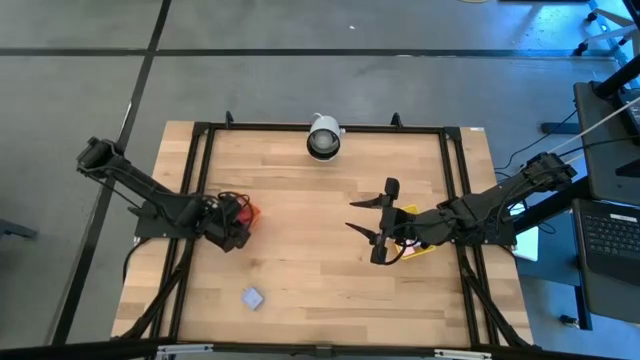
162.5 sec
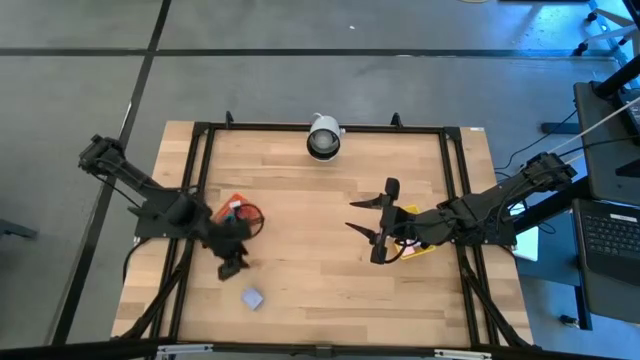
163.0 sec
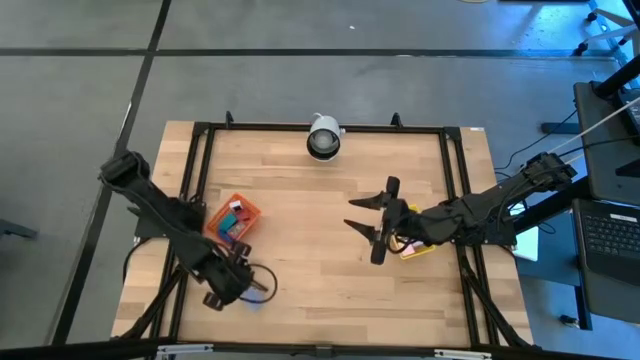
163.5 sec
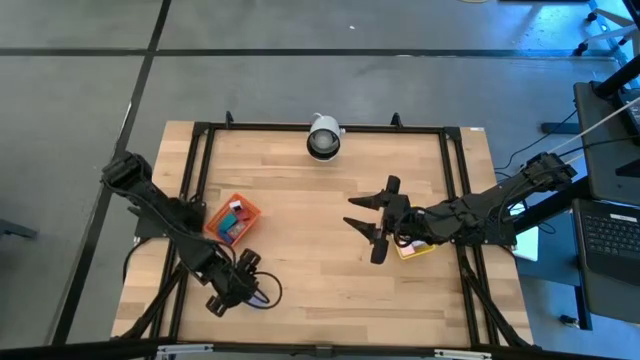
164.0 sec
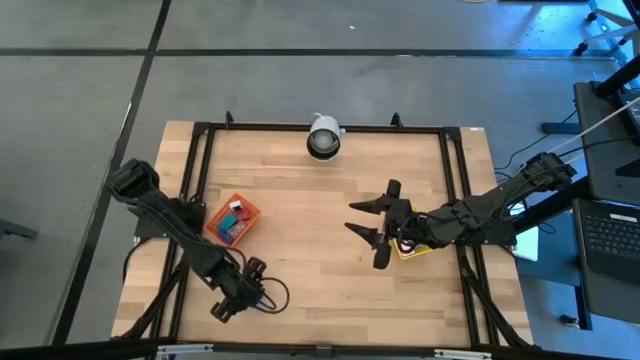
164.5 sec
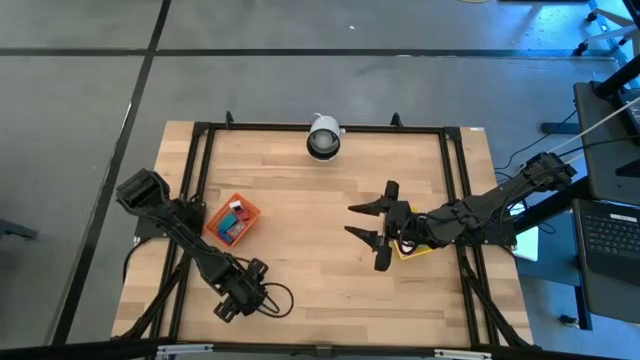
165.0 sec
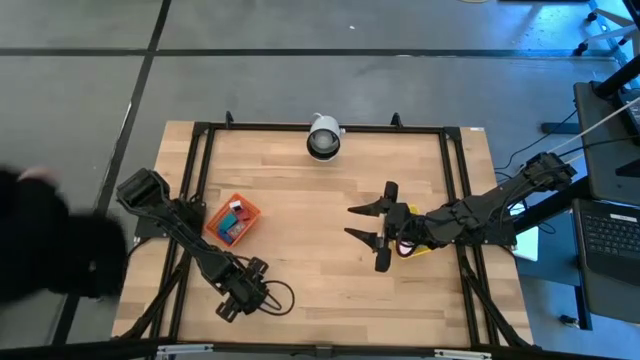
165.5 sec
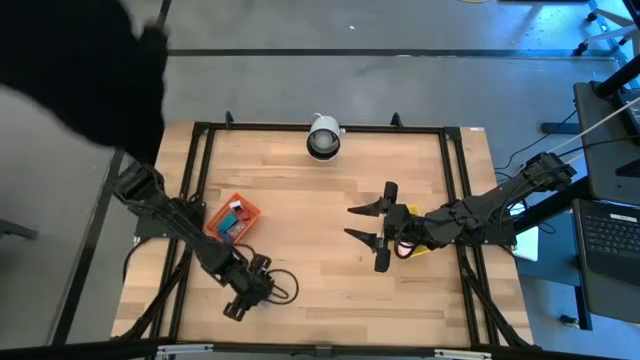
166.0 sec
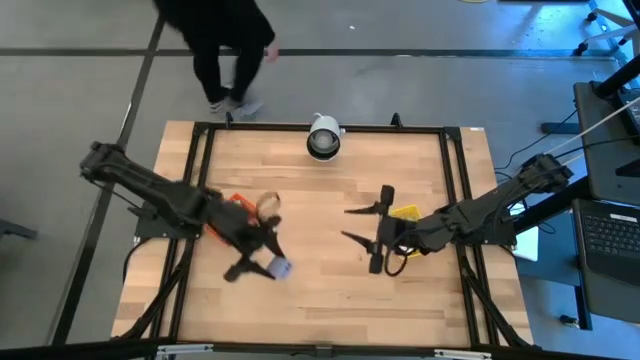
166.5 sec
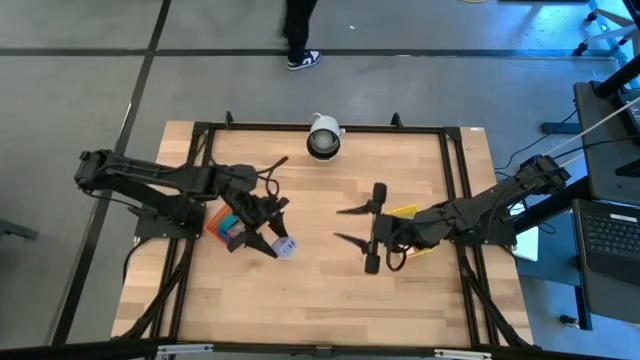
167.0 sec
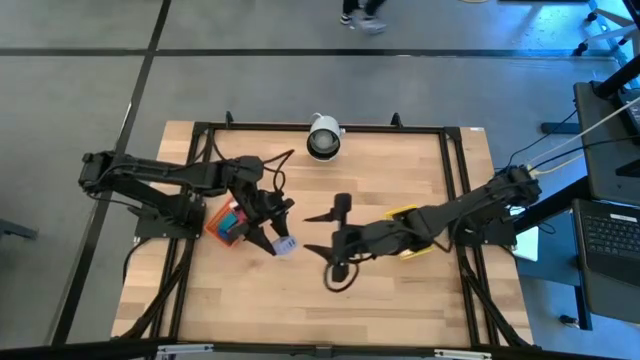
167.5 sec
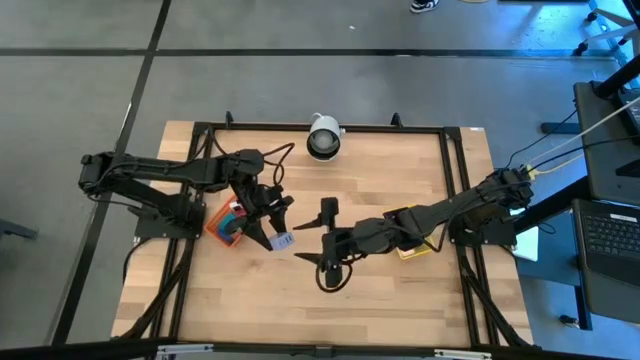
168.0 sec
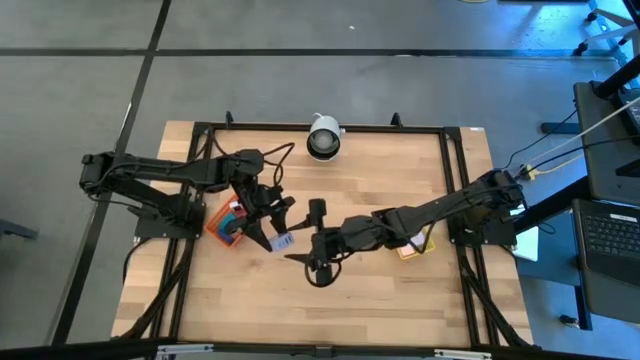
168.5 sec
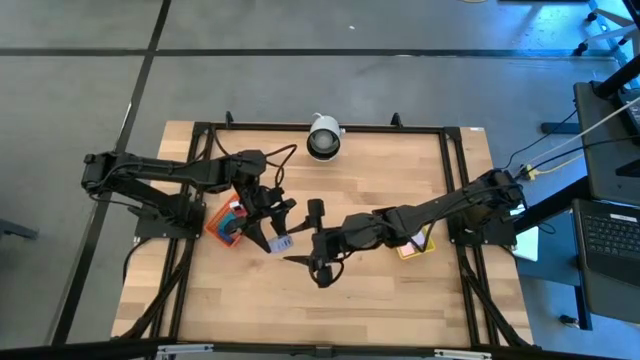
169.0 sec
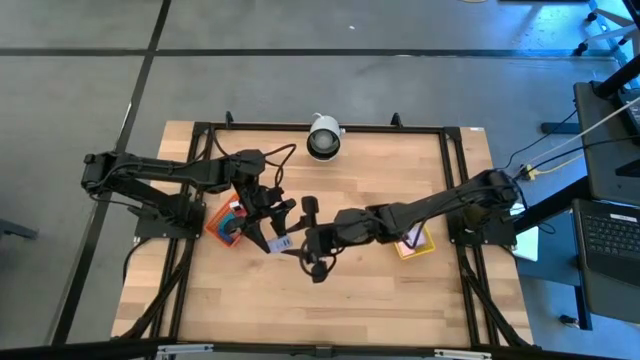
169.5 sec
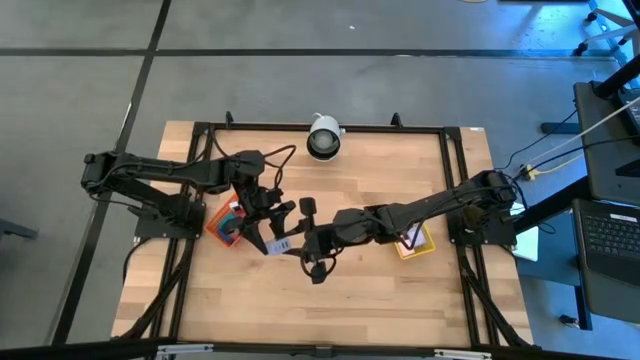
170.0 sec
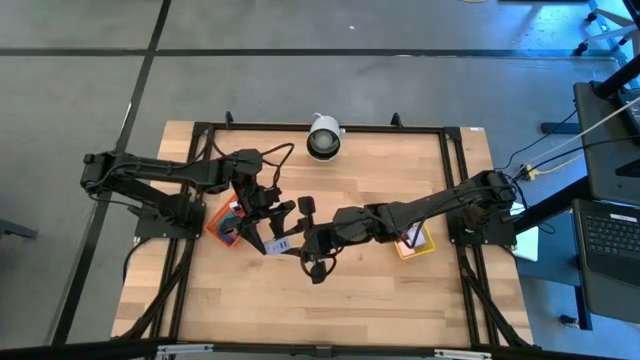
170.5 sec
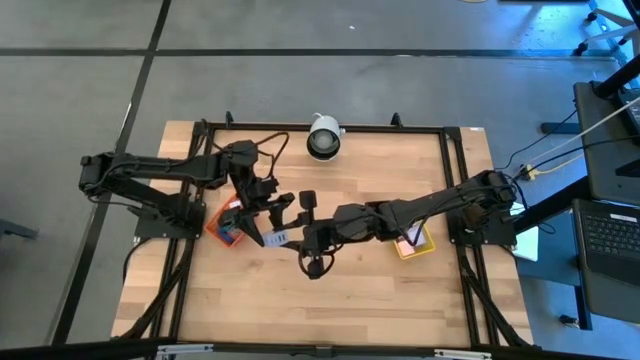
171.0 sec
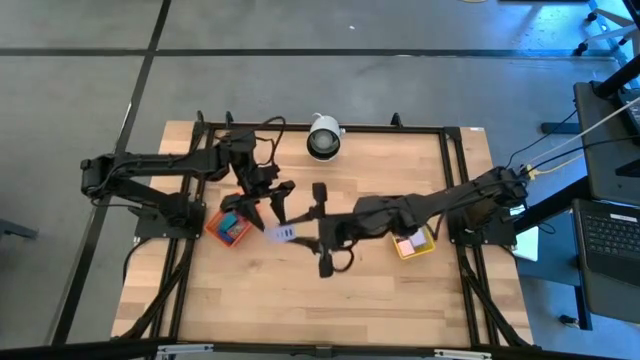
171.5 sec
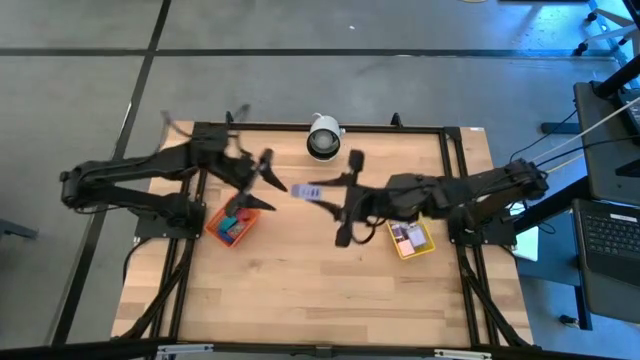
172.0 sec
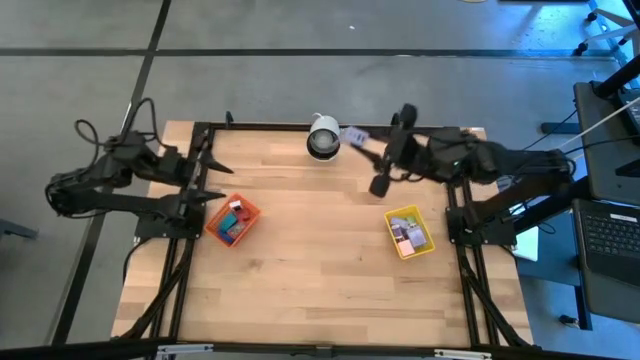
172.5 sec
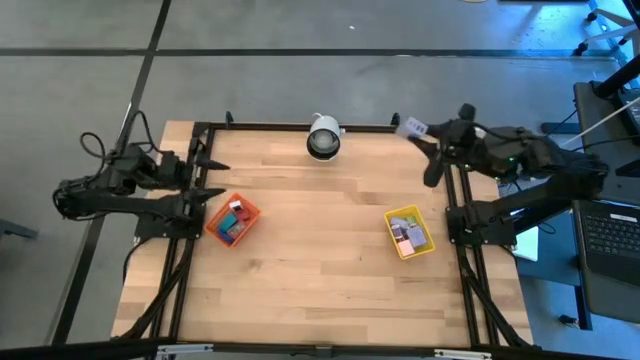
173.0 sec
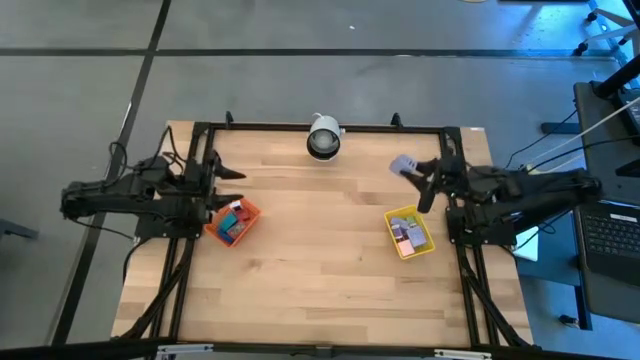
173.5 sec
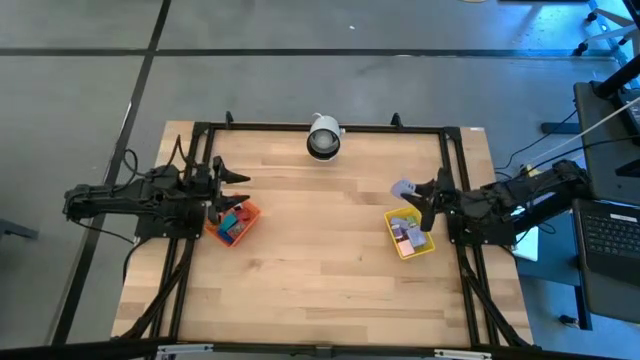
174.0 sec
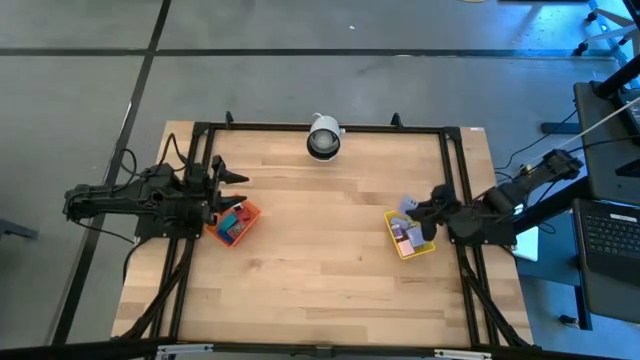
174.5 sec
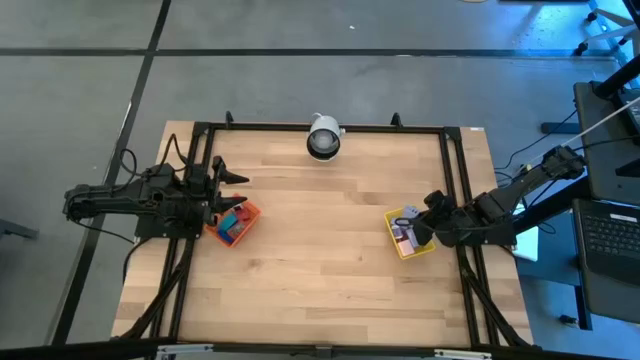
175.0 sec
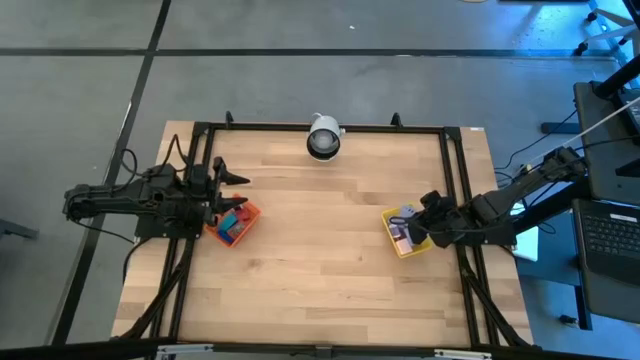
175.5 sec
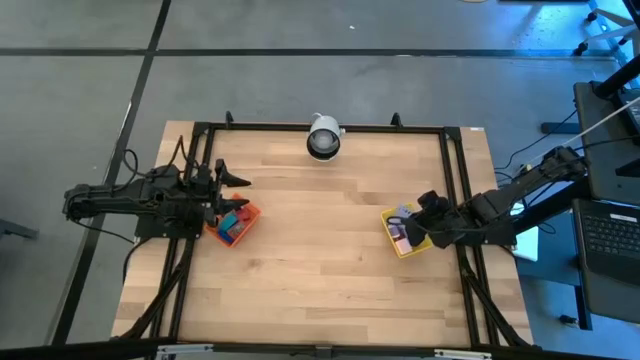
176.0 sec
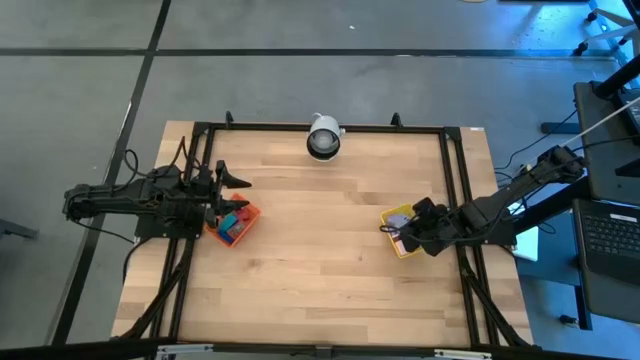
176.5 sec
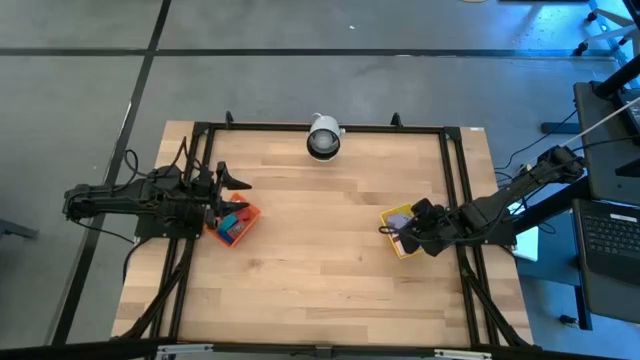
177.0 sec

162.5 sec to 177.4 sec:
Task: Pick & Place Office items
Put the purple charger adapter into the yellow basket

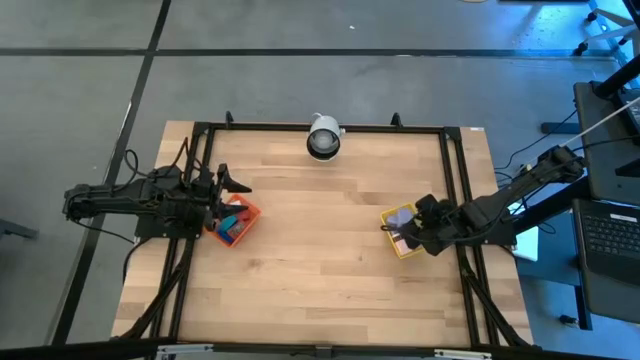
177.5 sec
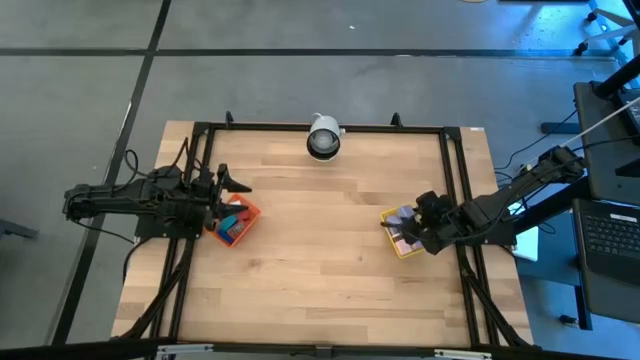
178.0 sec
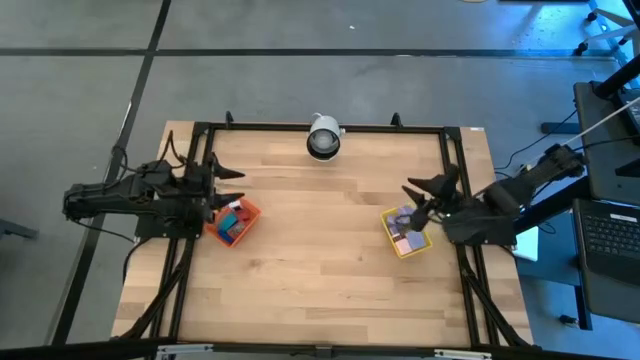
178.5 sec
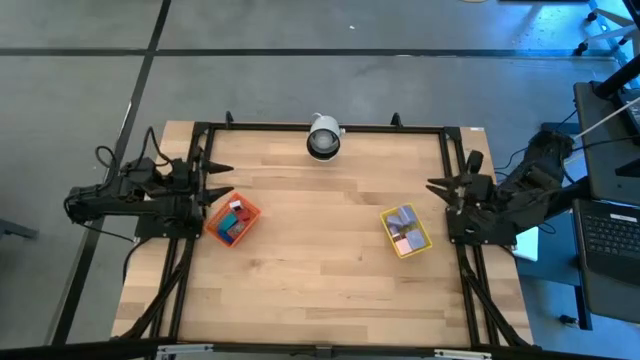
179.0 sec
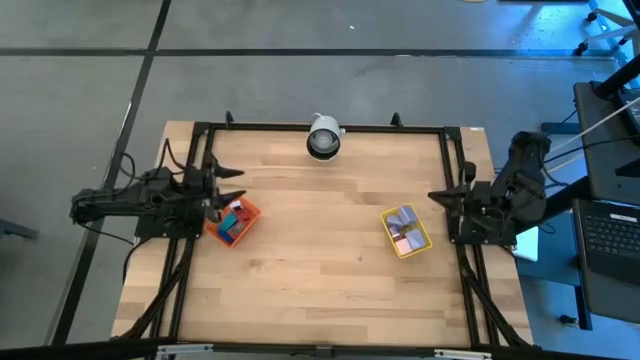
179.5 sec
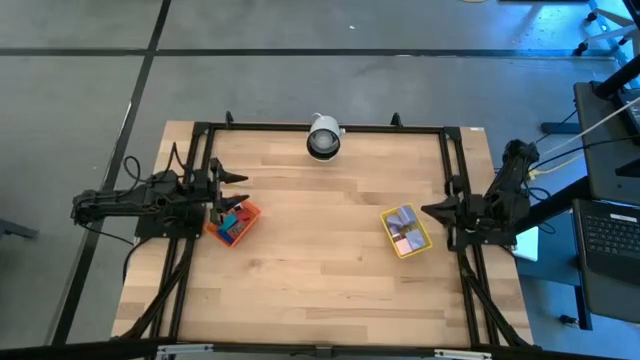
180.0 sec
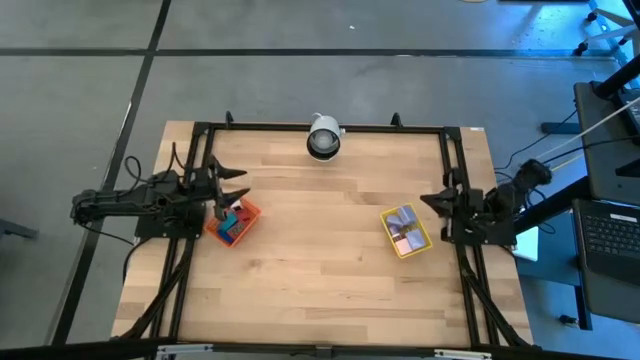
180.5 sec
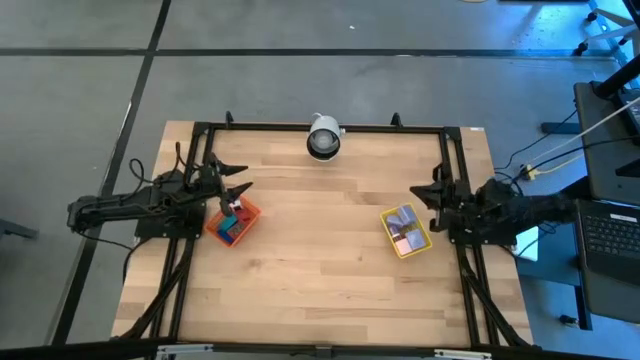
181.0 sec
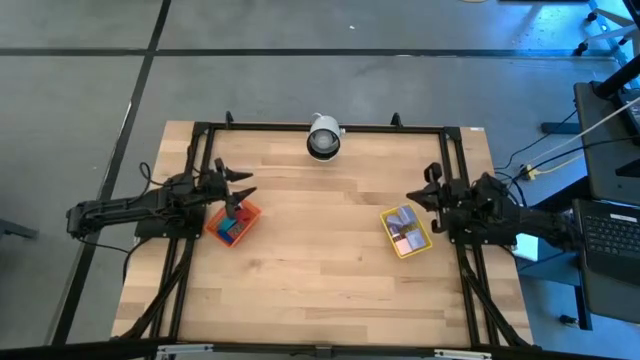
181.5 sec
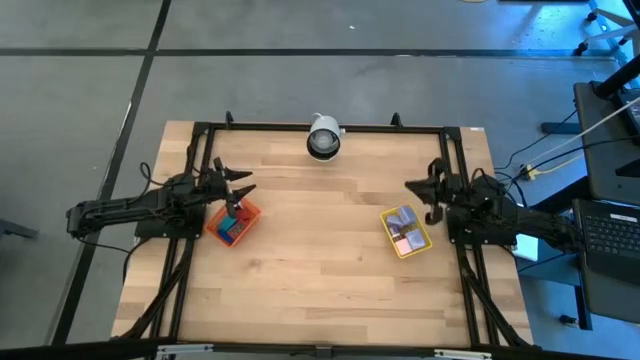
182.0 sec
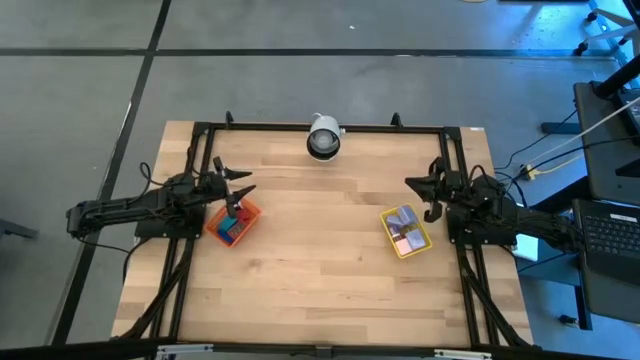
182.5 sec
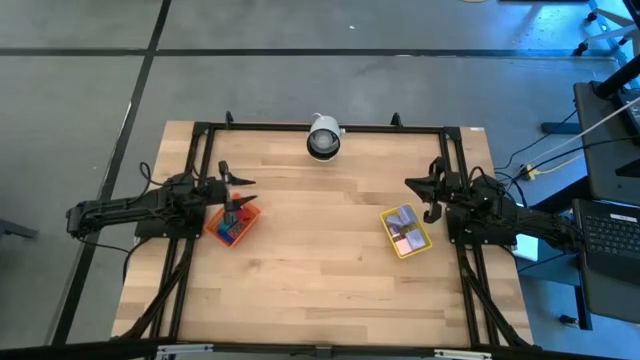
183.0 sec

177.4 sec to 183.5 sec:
Return to Home Position
